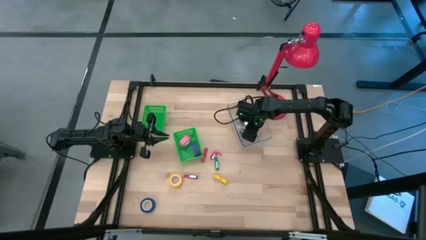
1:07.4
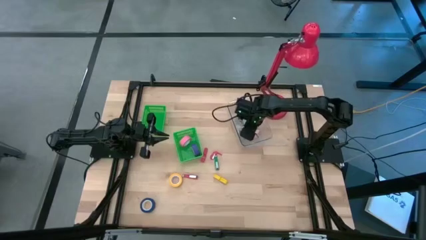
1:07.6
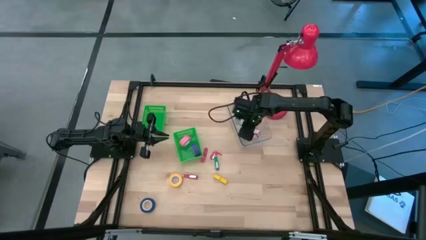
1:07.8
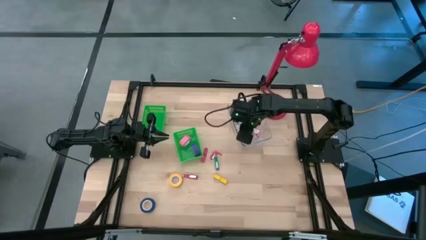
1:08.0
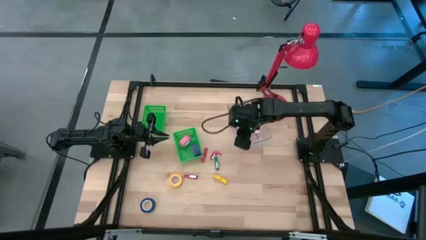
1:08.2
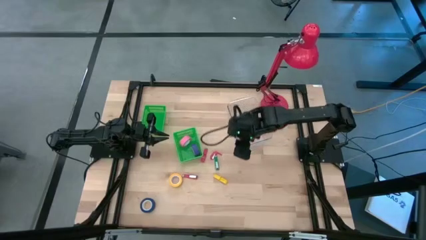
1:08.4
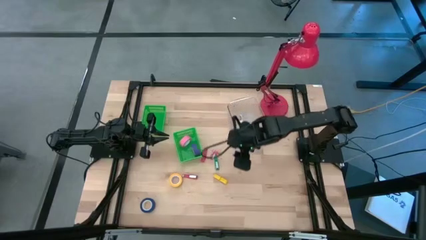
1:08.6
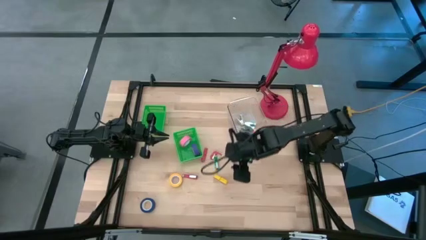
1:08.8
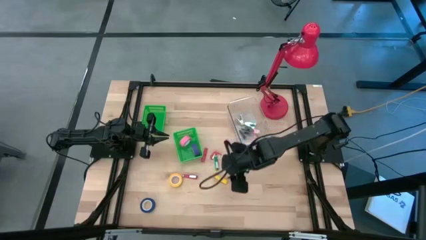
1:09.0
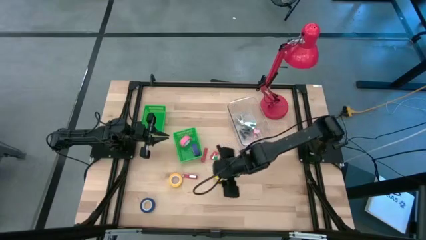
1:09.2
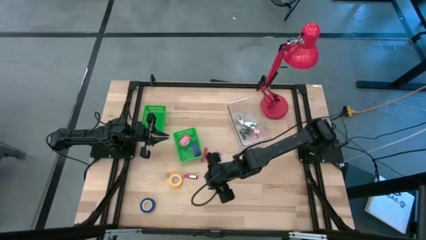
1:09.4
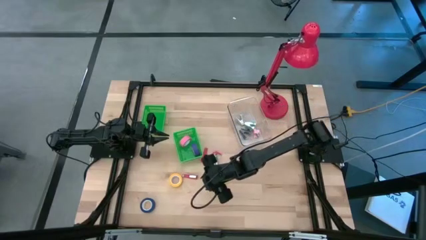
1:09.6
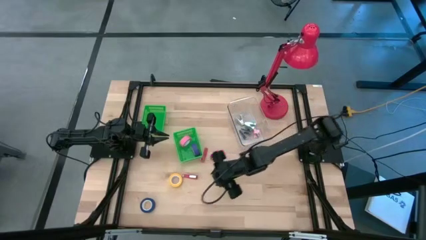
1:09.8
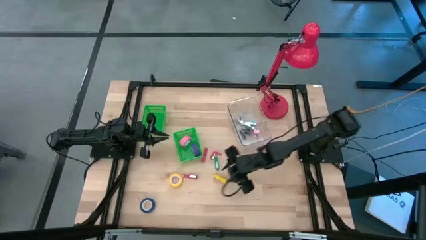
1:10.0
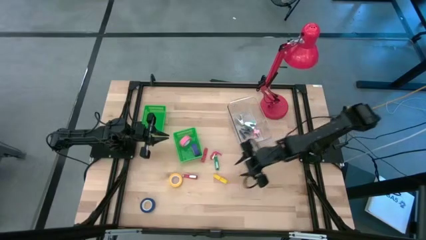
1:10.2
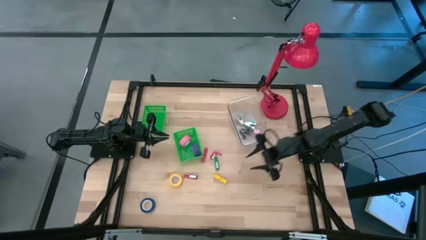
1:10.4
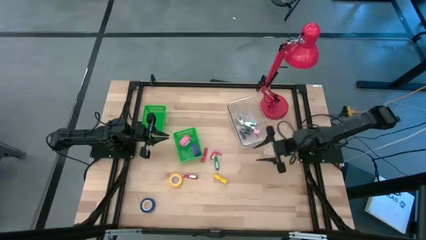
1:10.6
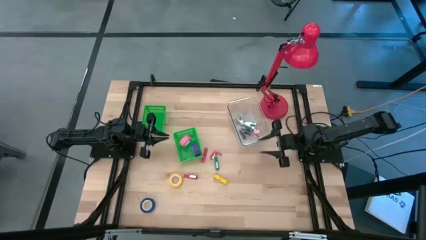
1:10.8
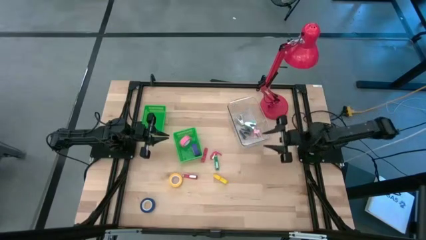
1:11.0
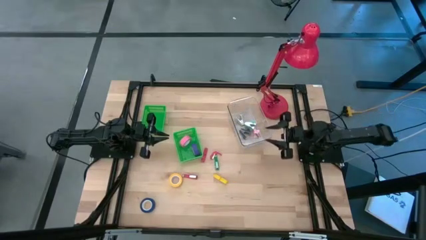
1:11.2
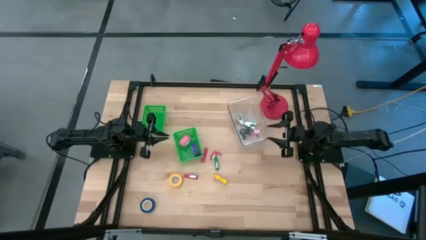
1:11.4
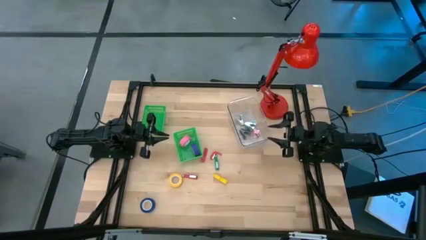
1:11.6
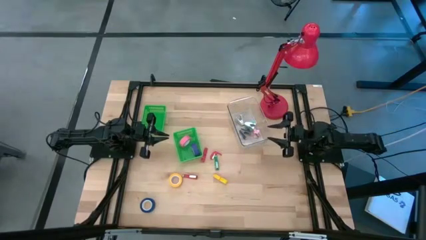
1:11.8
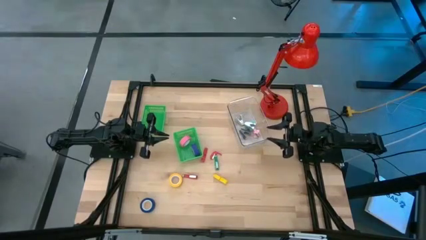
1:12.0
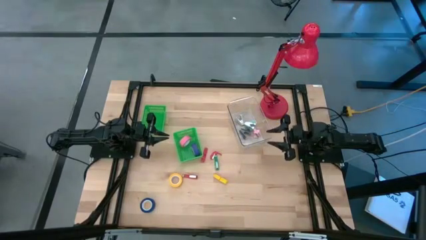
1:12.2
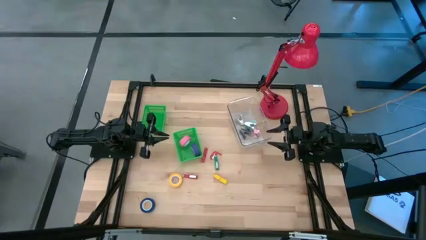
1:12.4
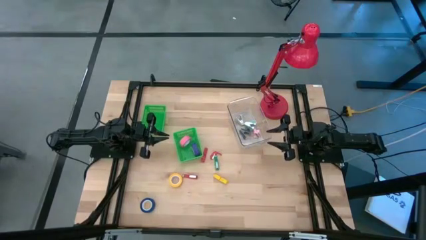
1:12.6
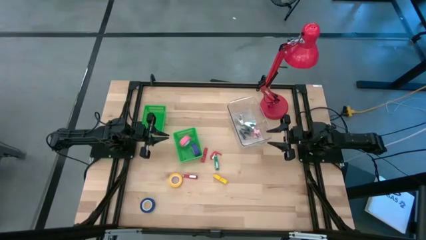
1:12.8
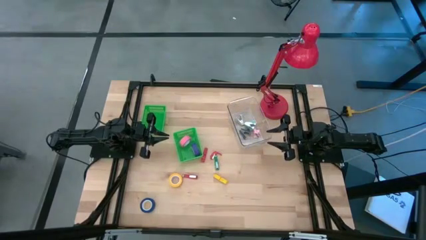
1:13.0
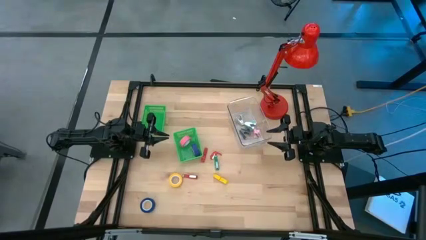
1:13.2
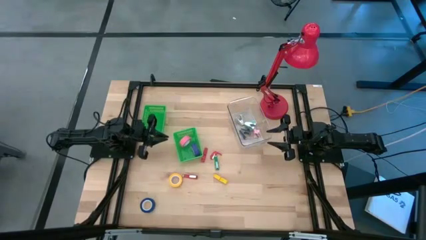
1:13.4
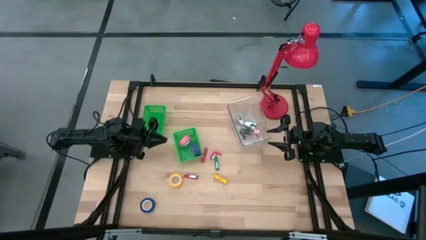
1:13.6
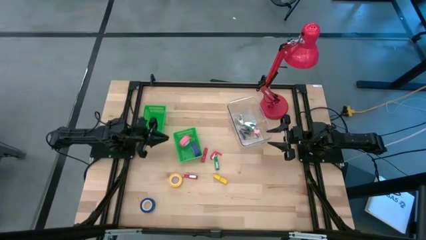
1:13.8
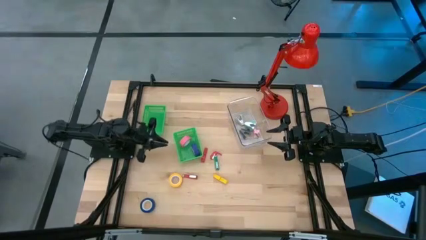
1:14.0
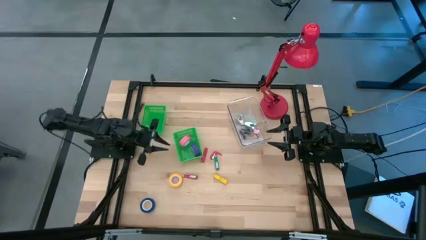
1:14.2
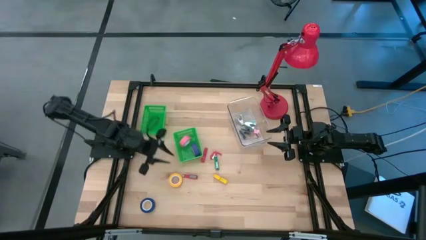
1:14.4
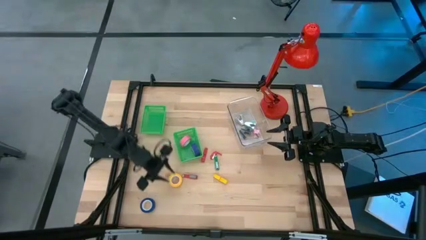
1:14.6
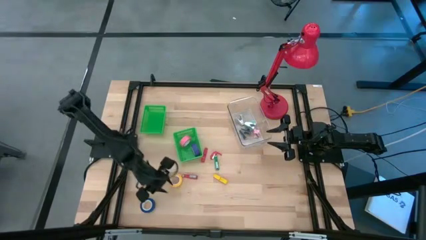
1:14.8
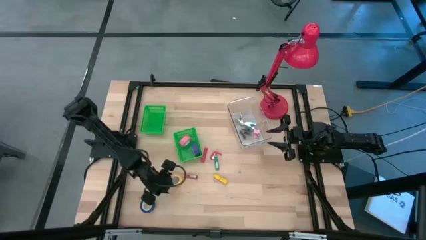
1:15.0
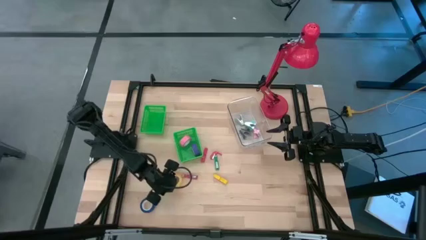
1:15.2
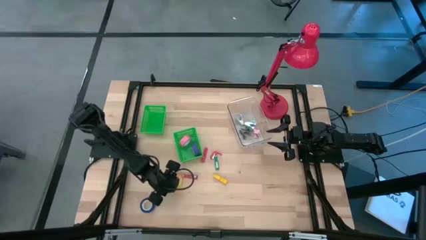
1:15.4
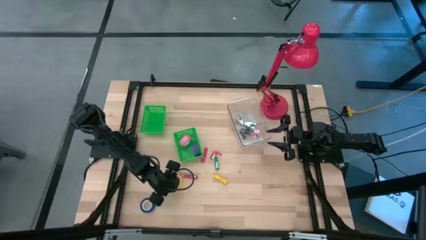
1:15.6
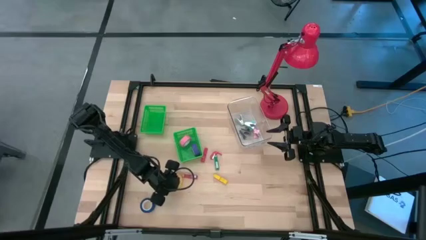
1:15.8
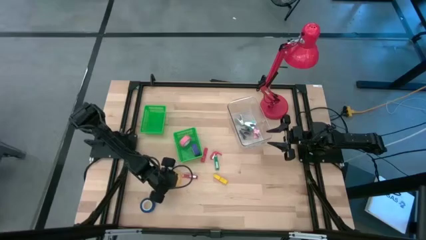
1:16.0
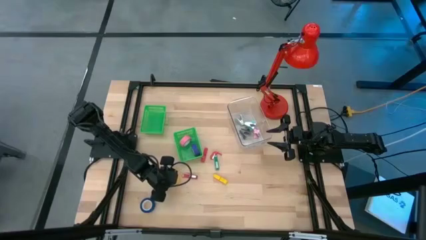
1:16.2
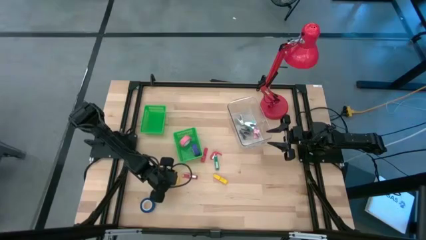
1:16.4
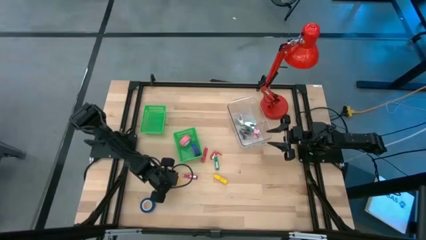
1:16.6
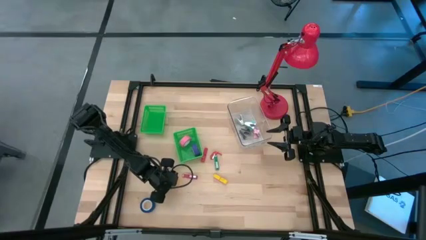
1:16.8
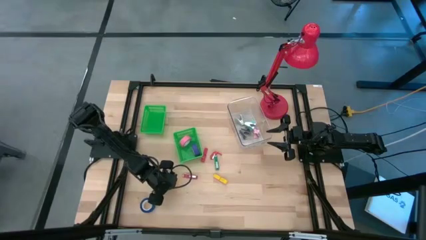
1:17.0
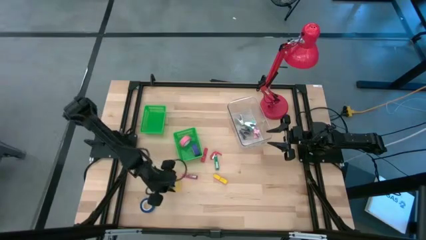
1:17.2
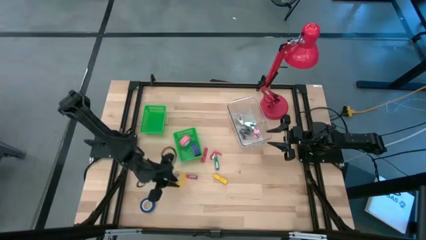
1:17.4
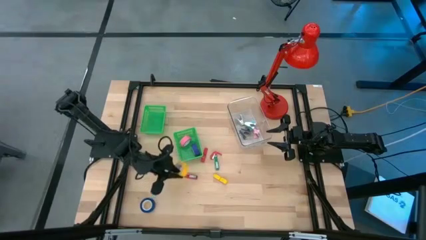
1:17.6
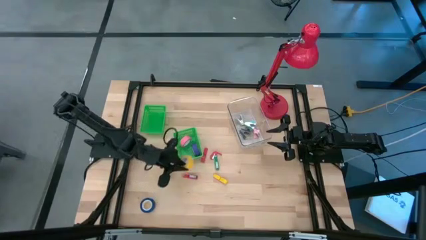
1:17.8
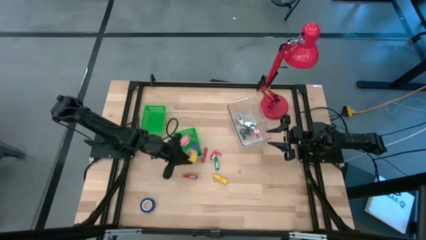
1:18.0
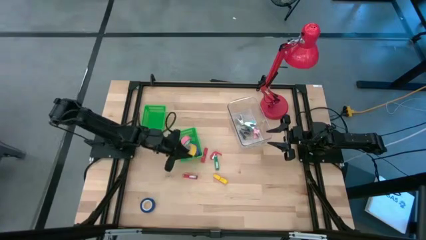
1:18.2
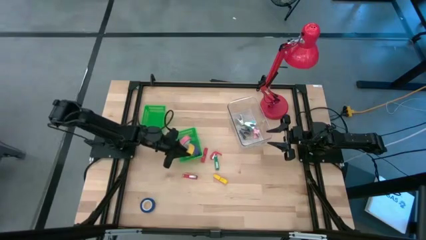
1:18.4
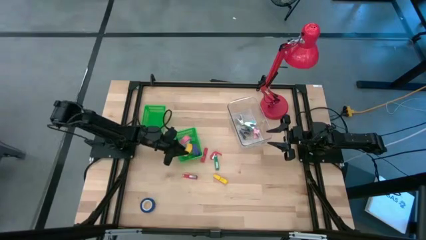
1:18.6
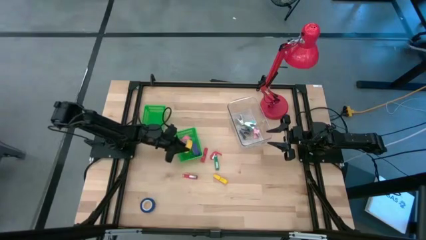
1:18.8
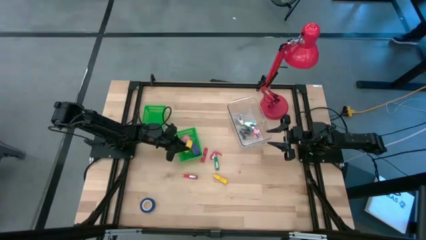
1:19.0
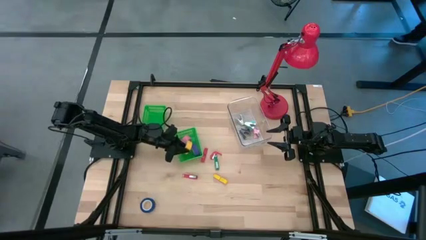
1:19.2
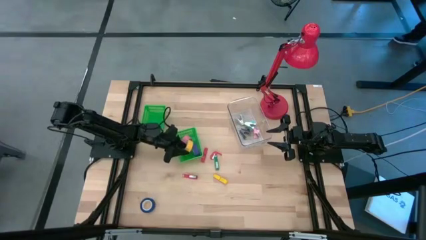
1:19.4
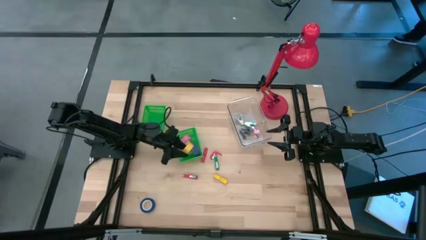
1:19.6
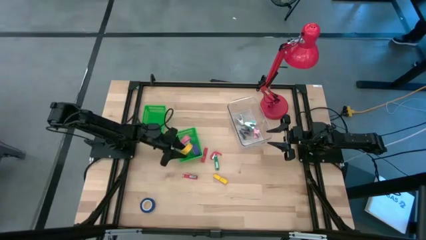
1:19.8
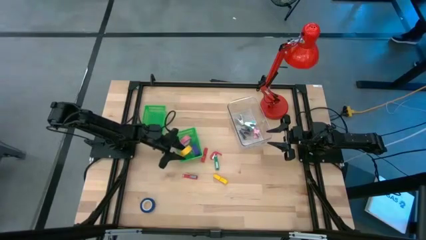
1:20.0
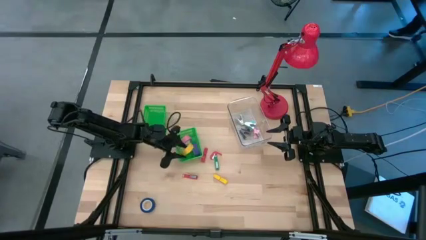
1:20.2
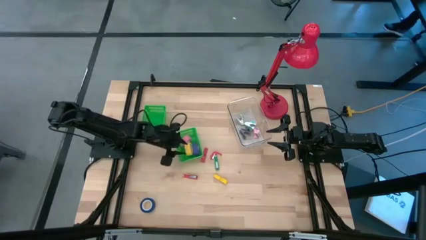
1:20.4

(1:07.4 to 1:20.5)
Task: Pick and place Stapler, Stapler remover, tape
Put the yellow tape into the right green bin

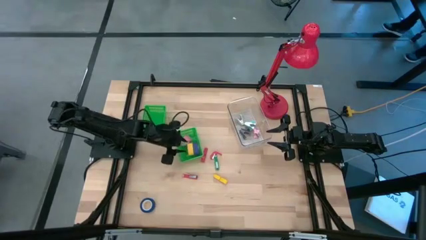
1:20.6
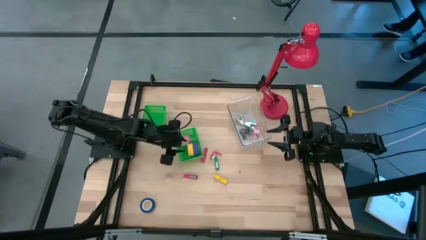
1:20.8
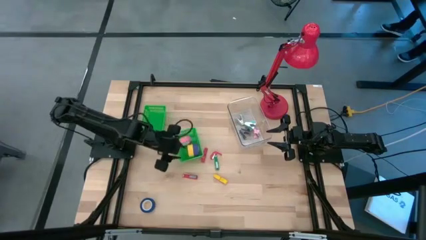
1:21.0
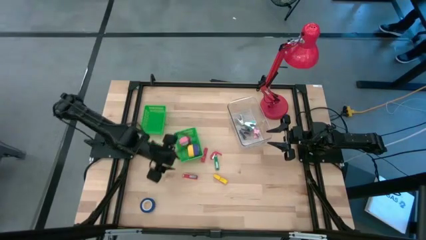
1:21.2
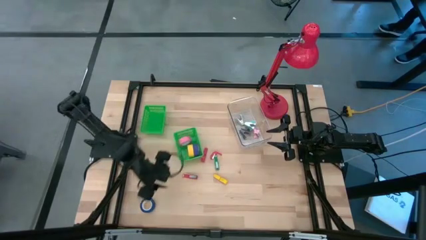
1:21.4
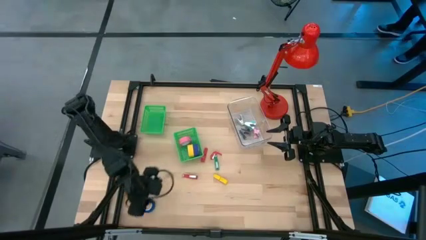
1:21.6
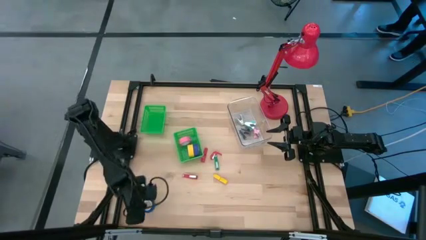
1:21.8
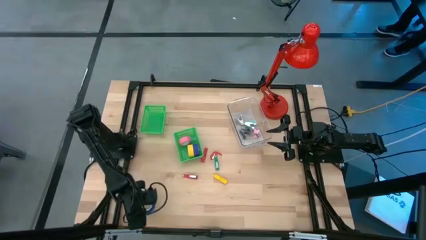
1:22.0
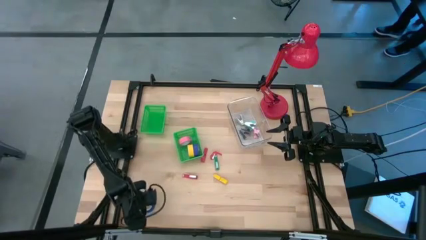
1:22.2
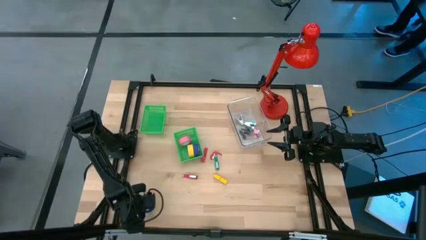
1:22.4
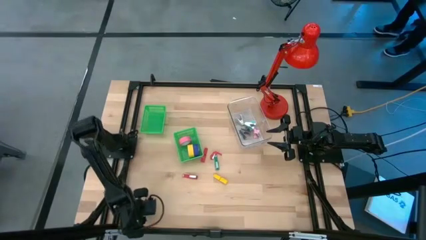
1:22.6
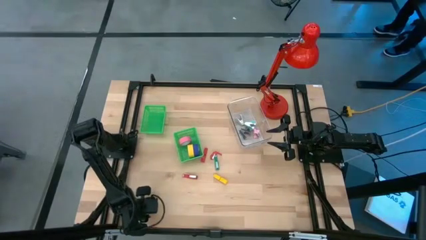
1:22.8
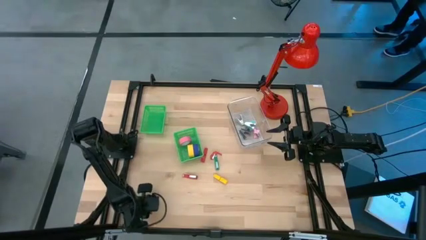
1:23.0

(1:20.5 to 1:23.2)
Put the blue tape into the right green bin
